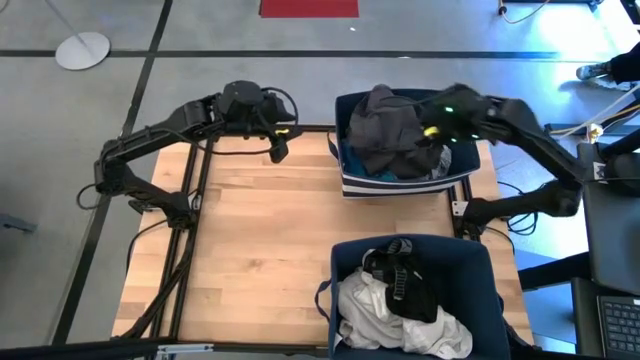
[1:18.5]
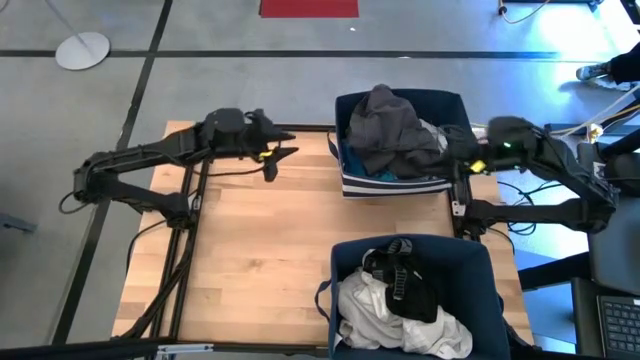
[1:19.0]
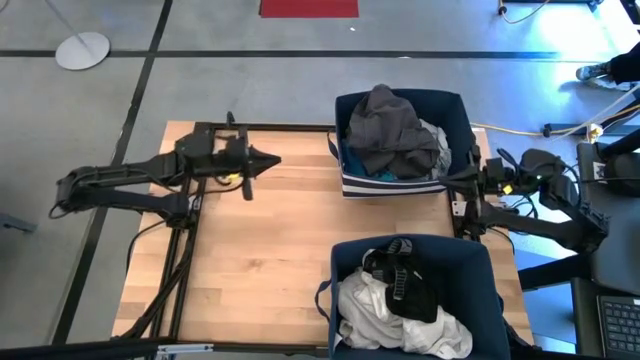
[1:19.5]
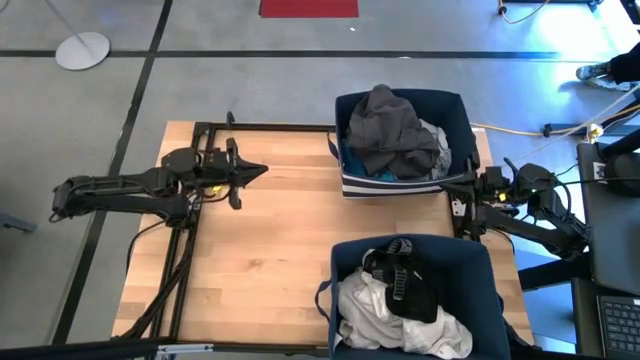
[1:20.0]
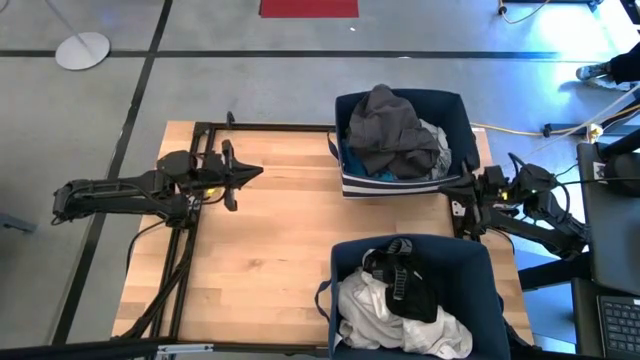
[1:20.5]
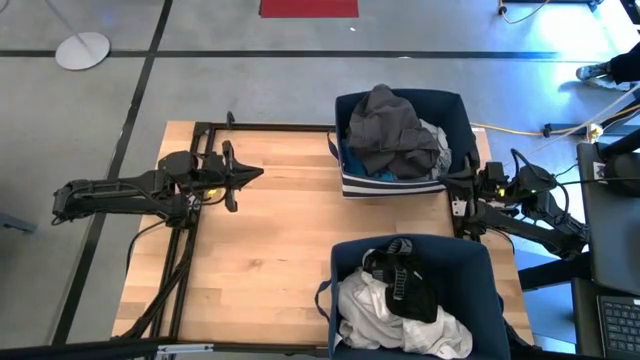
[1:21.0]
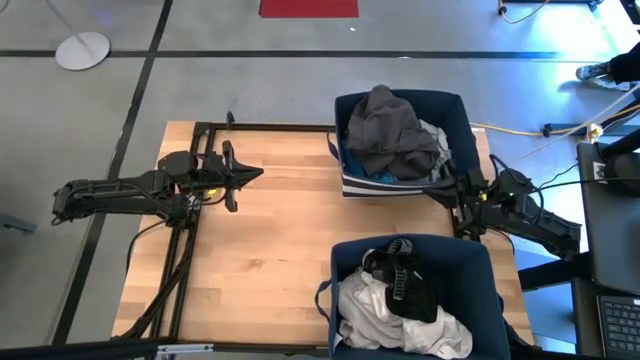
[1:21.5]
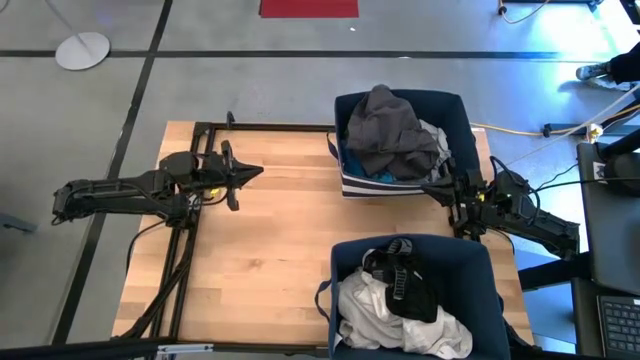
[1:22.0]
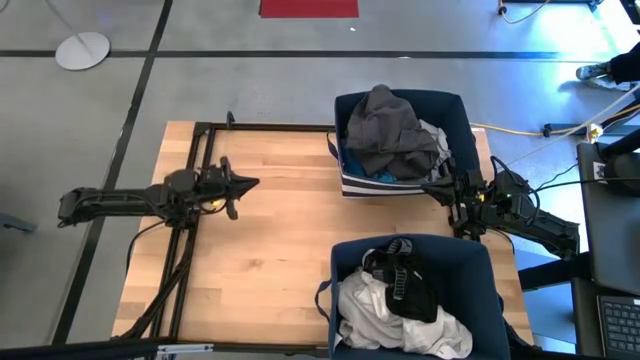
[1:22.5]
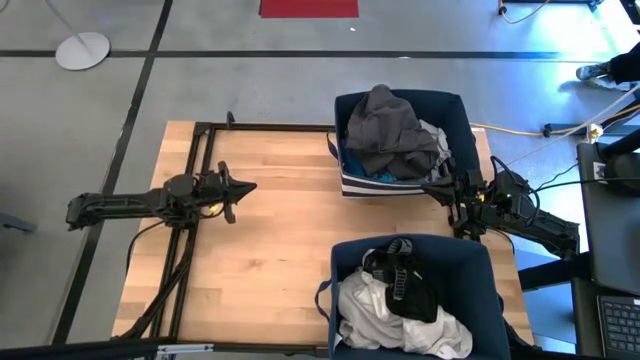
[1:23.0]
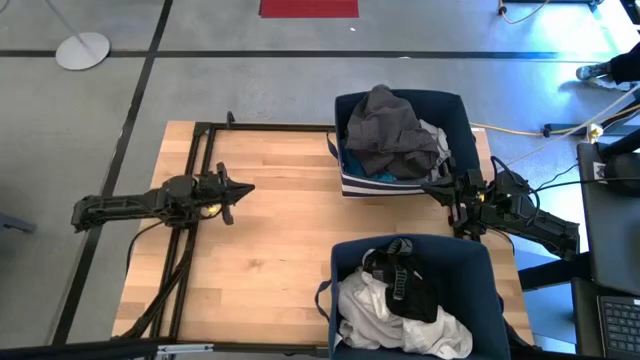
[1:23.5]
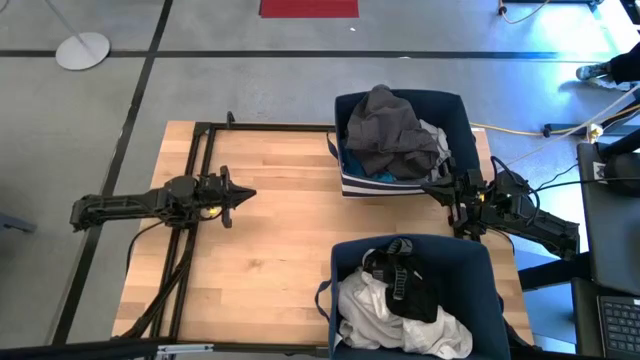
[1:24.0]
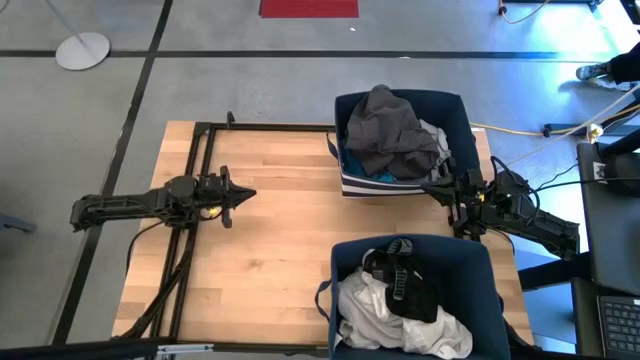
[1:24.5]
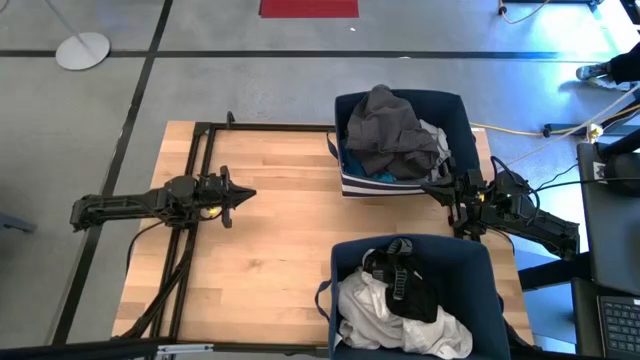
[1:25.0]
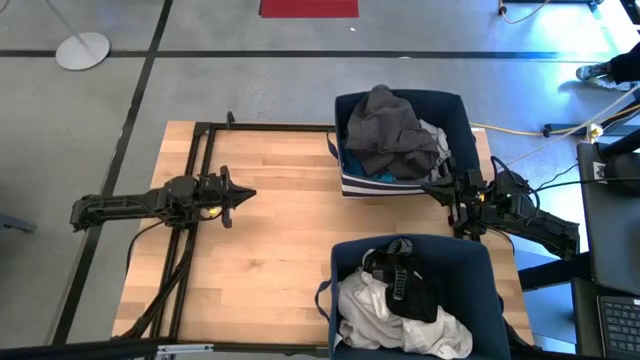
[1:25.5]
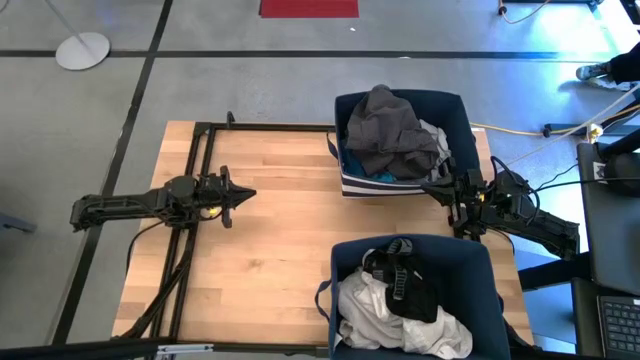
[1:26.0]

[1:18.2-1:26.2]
Task: Sort clothes
Return to Home Position

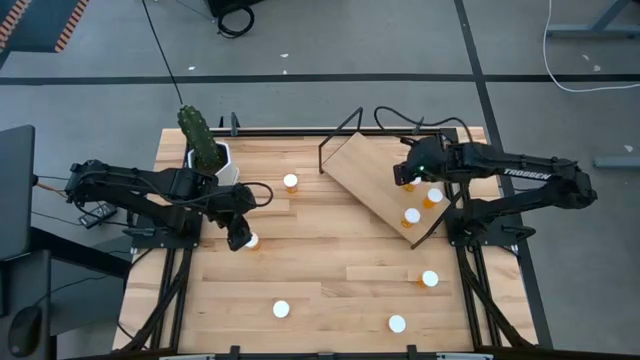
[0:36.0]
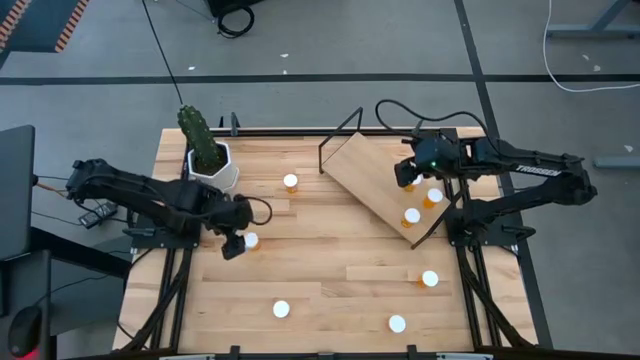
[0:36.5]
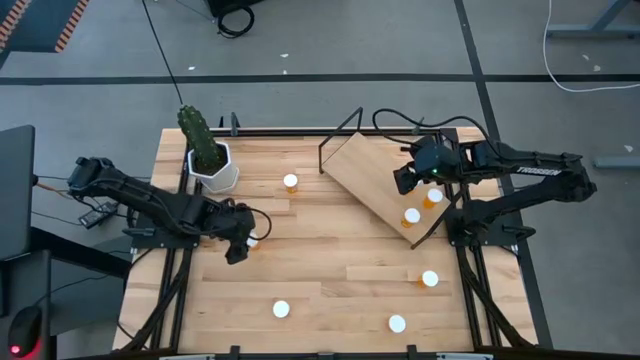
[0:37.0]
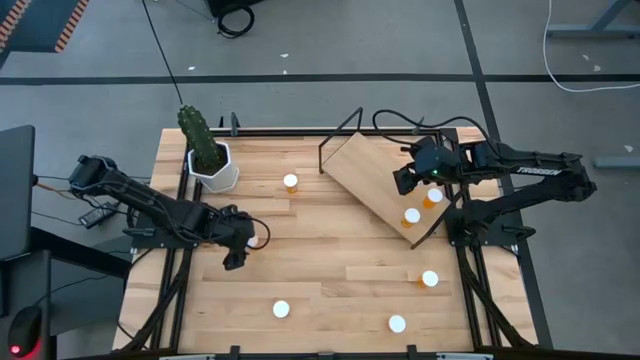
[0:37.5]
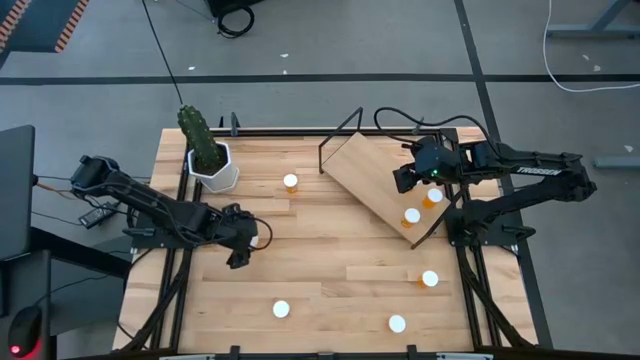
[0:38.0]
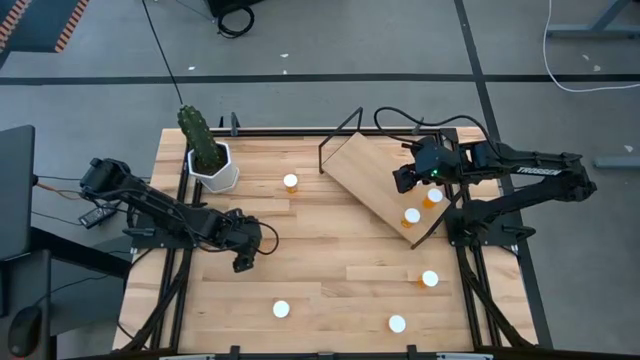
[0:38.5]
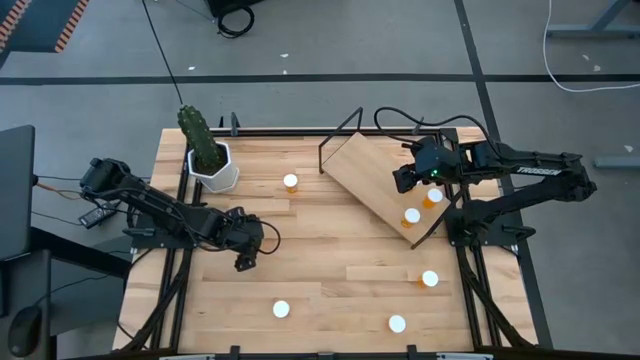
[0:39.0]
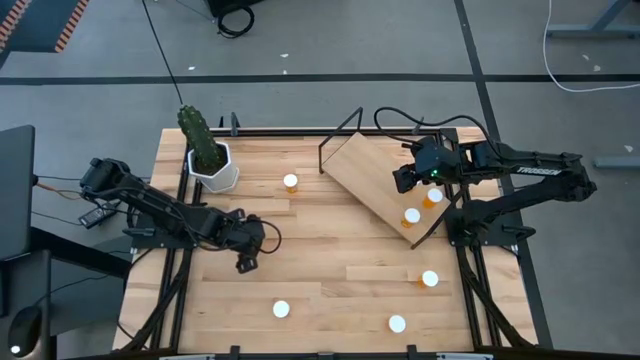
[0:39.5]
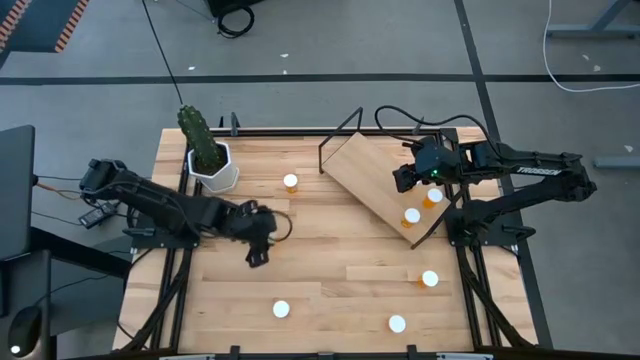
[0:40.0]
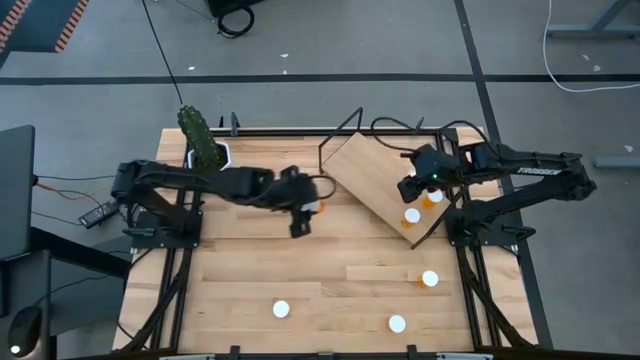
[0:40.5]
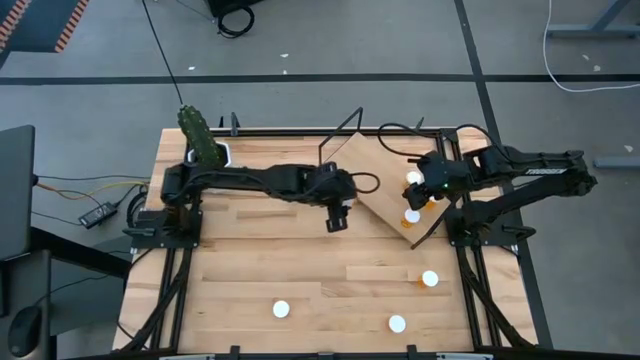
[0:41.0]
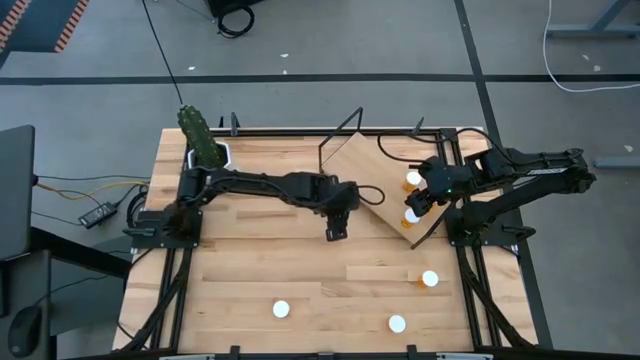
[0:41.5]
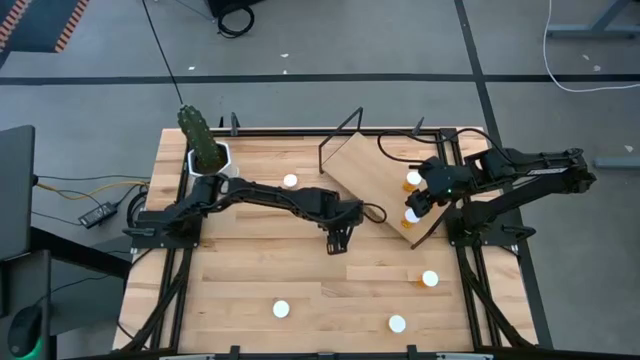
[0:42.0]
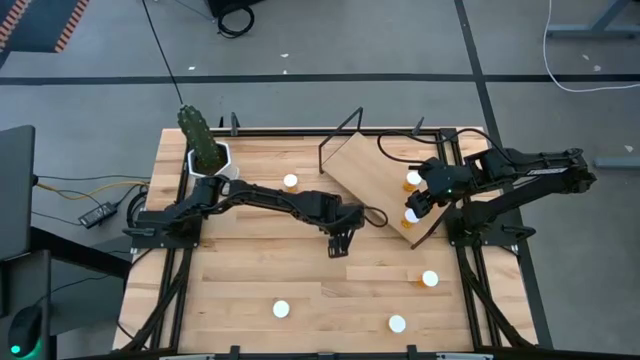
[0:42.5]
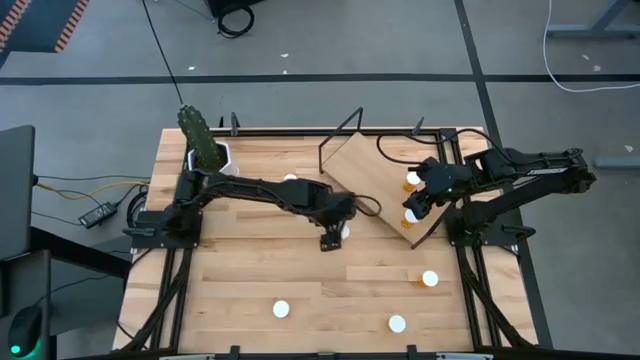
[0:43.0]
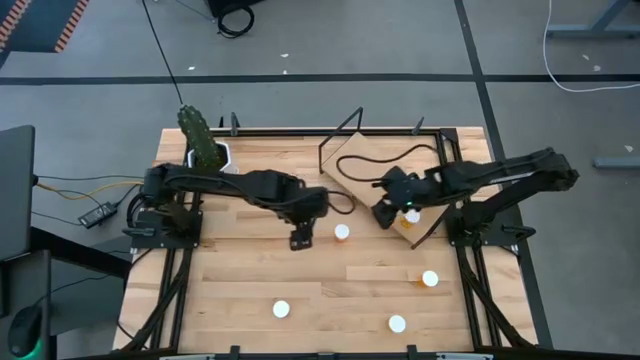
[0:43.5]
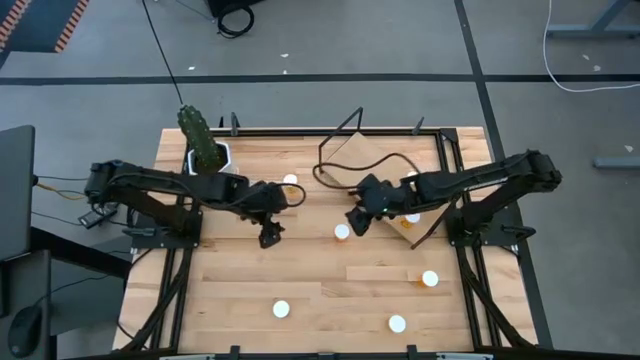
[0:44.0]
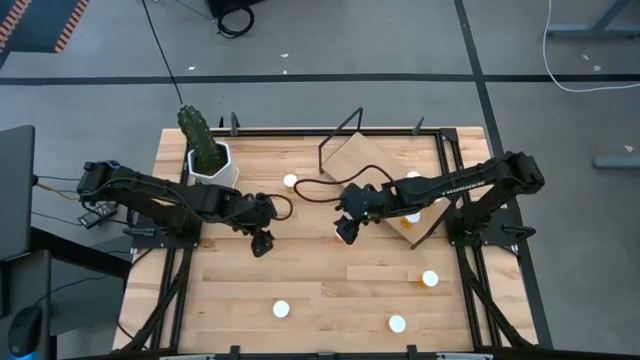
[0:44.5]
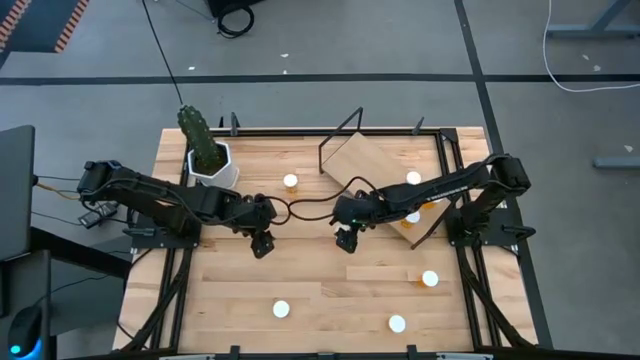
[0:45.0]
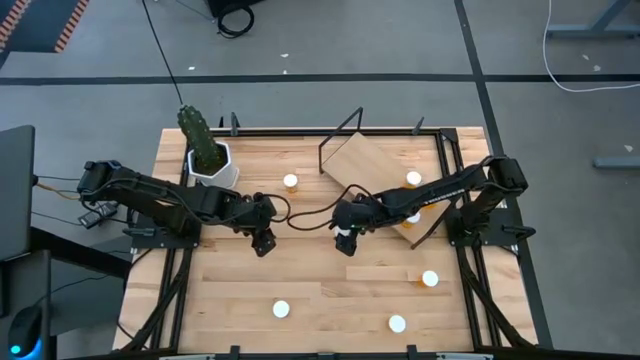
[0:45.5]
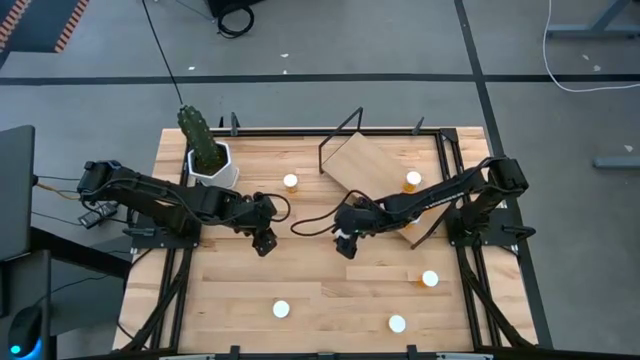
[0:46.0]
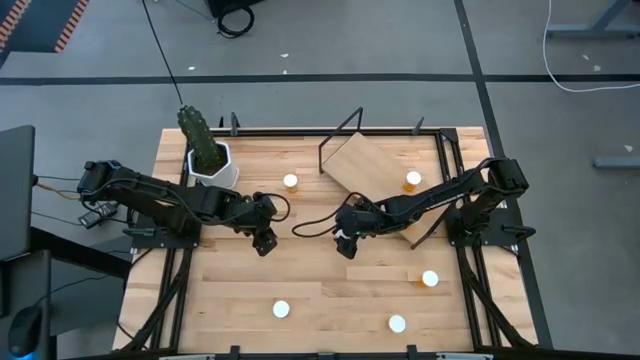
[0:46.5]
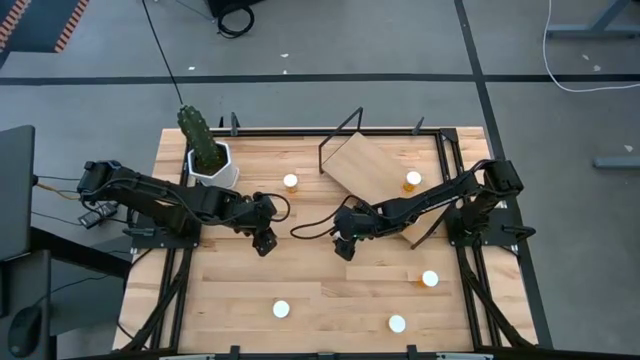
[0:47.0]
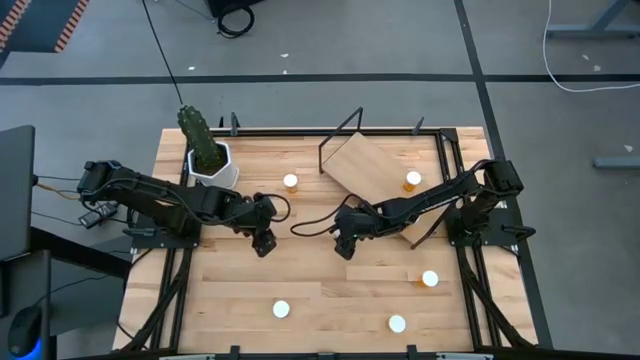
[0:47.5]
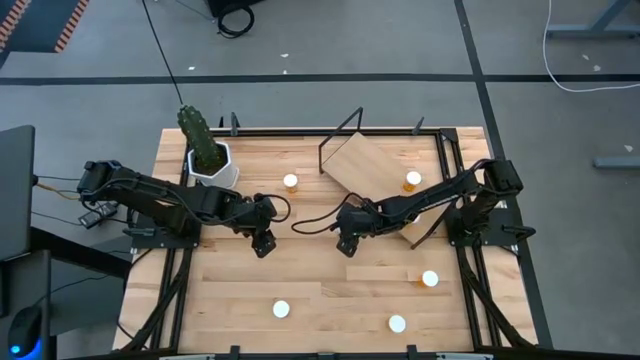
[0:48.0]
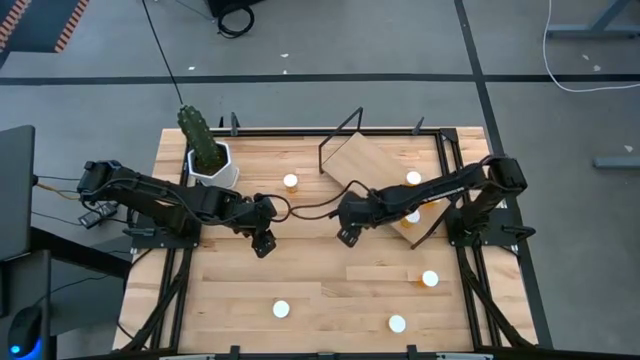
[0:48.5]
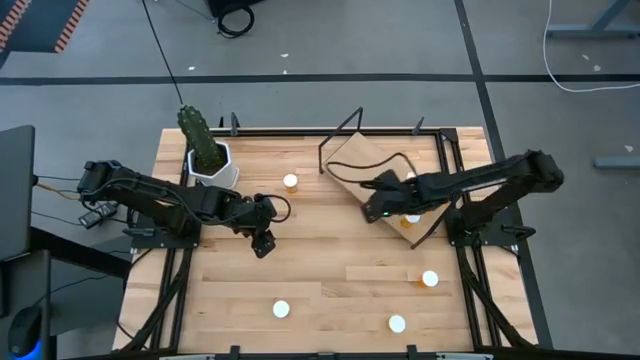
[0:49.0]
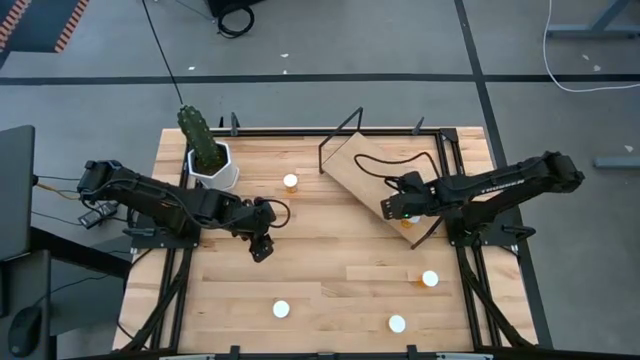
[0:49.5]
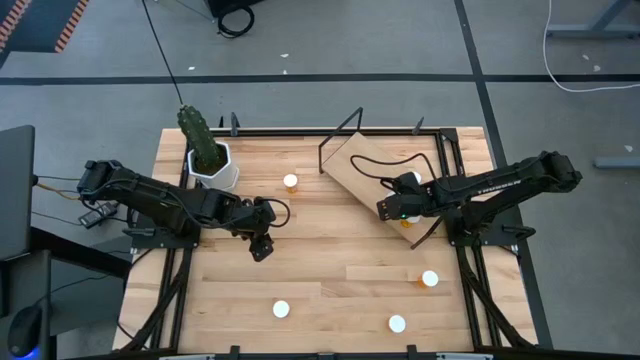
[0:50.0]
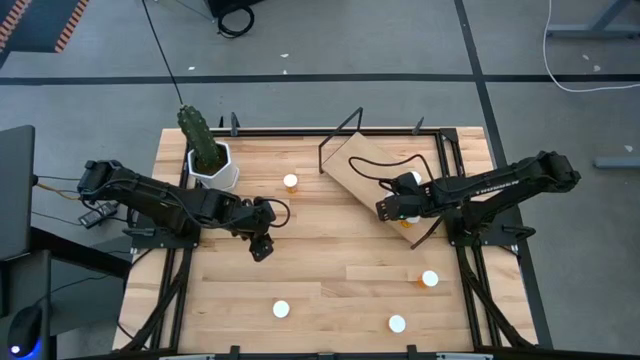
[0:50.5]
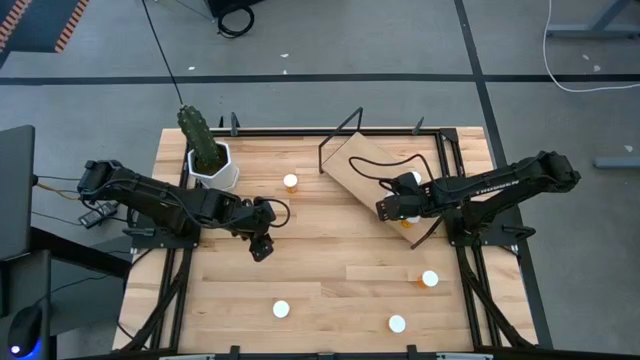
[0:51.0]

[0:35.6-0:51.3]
Task: Pick and place medicine bottles onto shelf by color
Put the orange pill bottle on the shelf aligned with the middle right orange pill bottle
